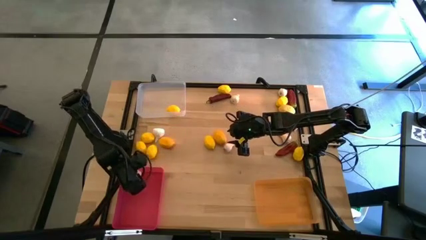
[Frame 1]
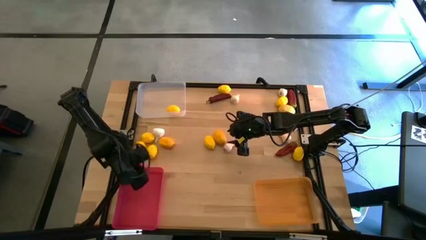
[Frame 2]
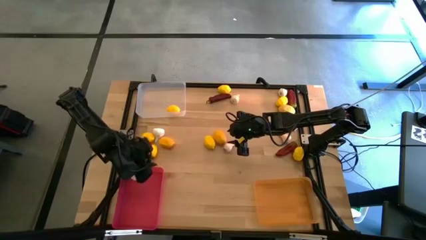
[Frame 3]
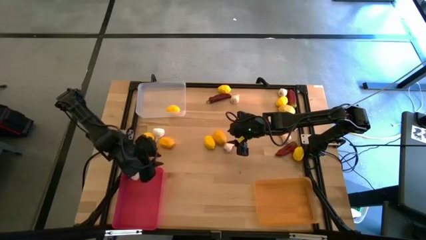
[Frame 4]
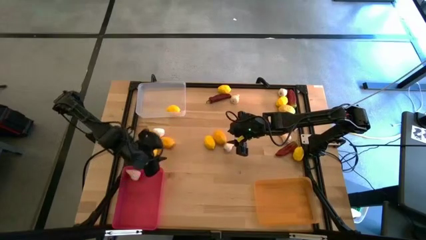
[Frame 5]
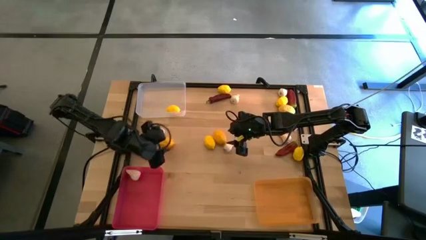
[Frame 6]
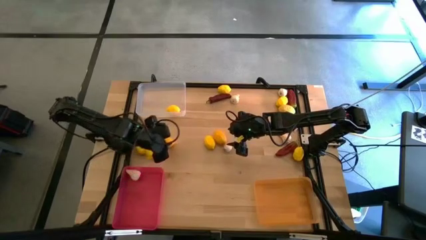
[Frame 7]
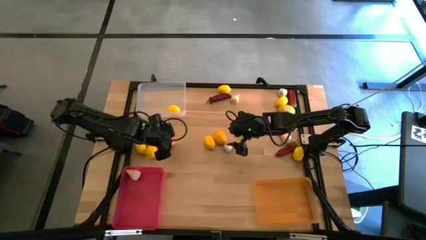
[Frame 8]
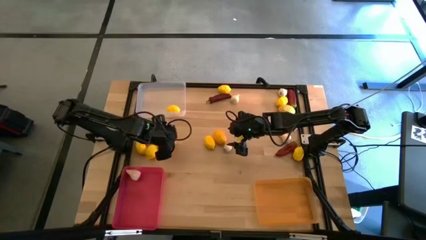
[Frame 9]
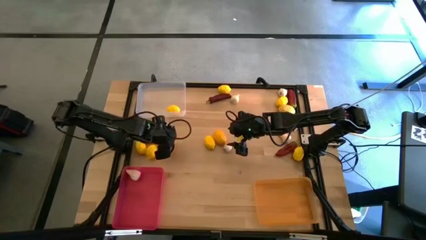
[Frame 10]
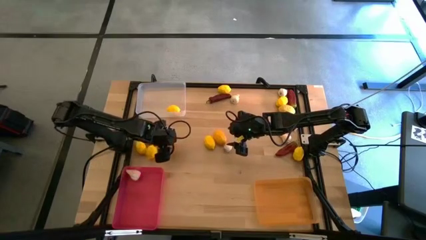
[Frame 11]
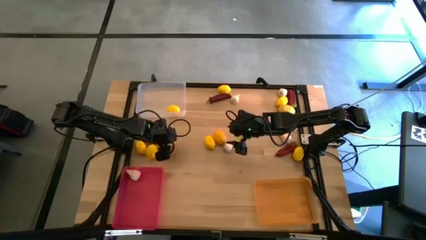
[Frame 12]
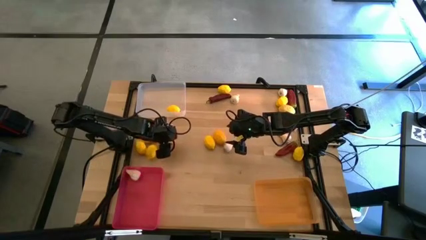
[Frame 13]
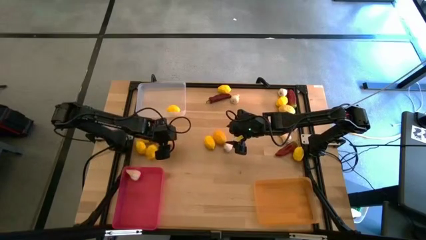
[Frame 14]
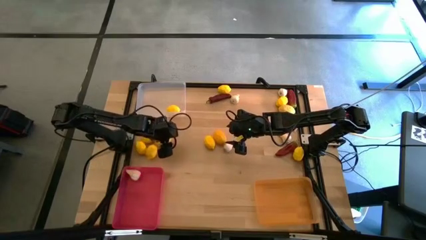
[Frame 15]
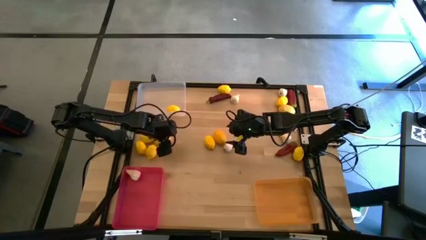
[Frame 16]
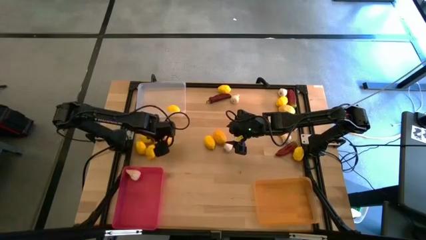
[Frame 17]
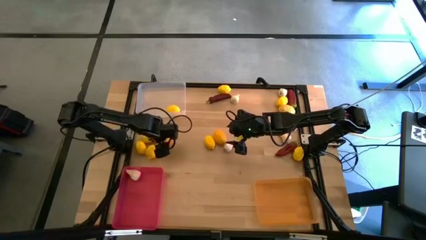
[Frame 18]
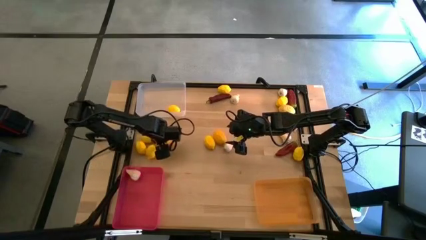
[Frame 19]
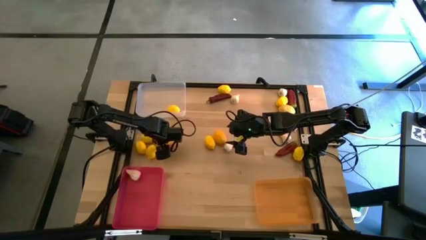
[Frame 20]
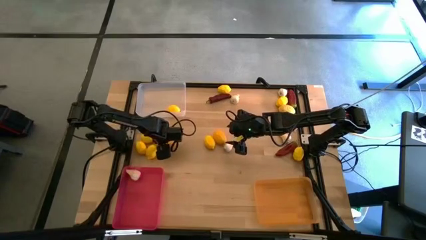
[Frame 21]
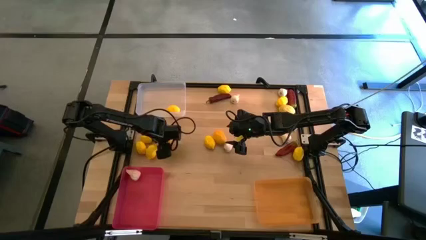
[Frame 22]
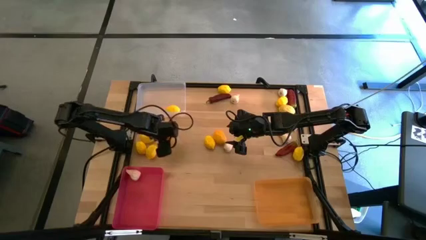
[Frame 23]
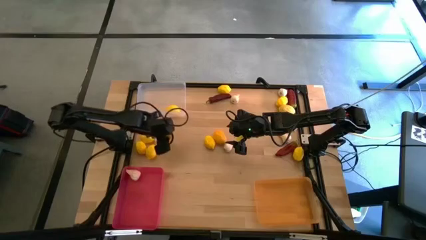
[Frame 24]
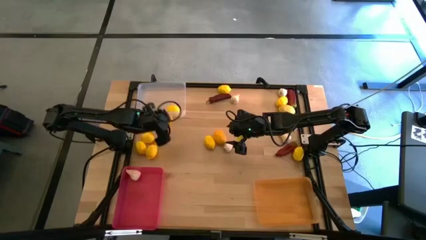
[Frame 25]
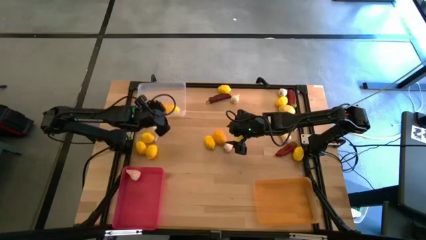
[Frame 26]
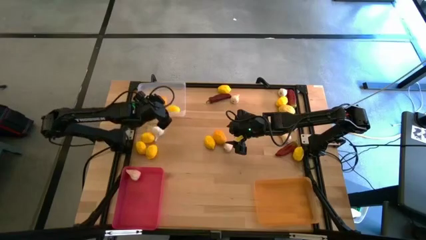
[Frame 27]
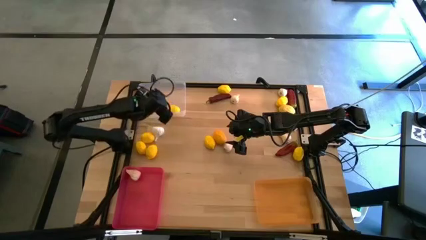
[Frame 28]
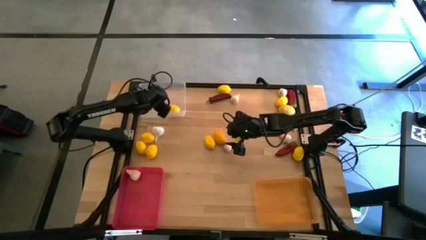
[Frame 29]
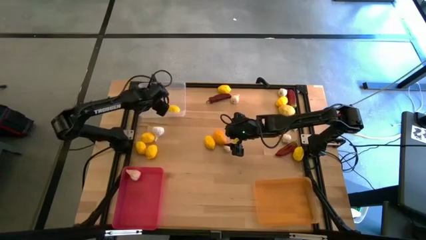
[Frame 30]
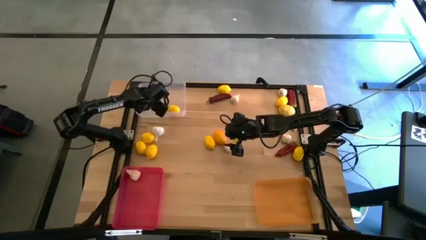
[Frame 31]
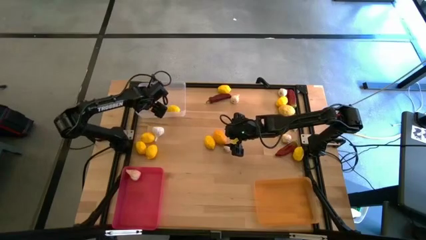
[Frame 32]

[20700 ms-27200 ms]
Task: Sort produce into baskets
Put the yellow lemon into the left white bin

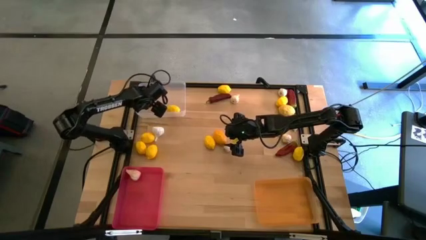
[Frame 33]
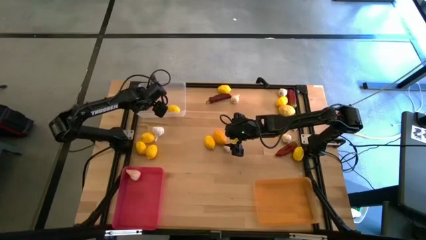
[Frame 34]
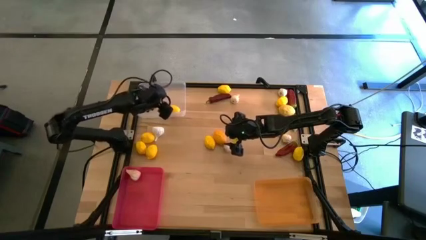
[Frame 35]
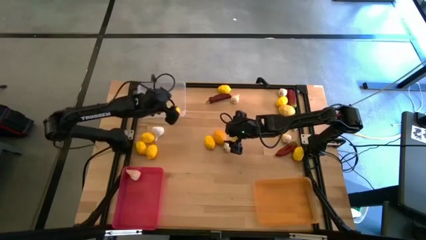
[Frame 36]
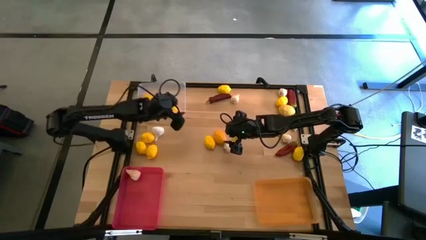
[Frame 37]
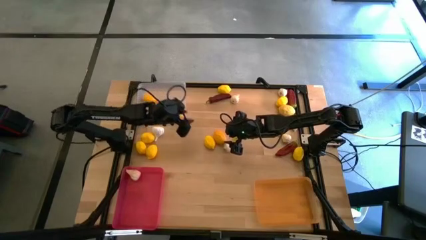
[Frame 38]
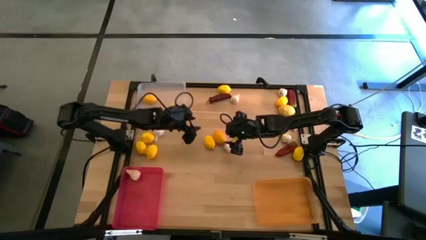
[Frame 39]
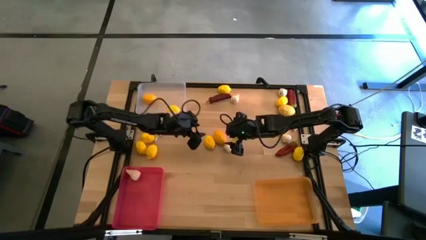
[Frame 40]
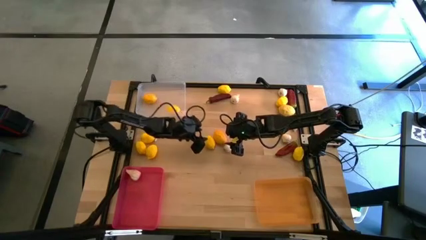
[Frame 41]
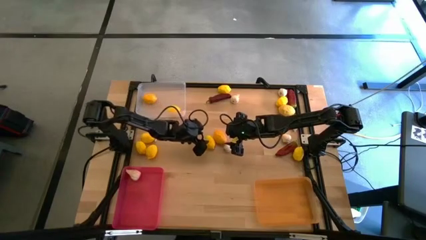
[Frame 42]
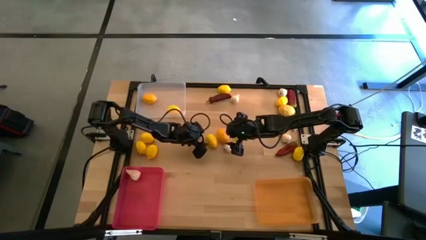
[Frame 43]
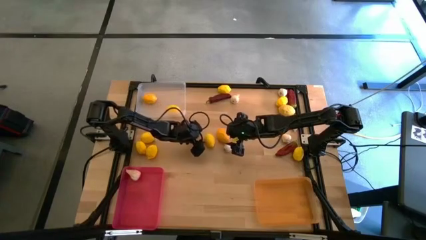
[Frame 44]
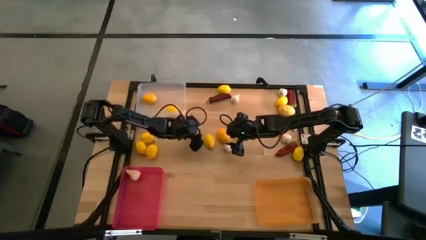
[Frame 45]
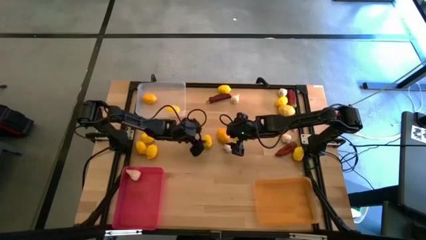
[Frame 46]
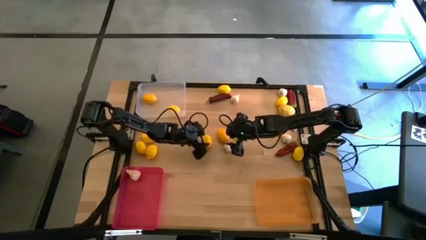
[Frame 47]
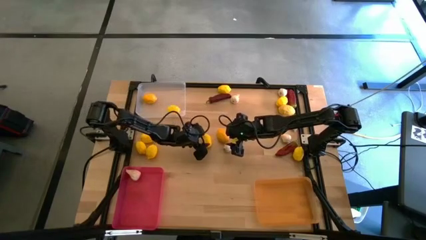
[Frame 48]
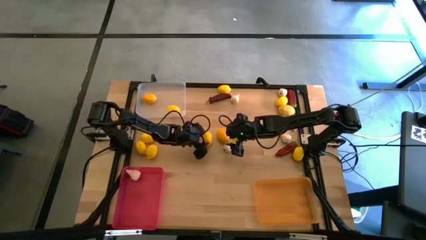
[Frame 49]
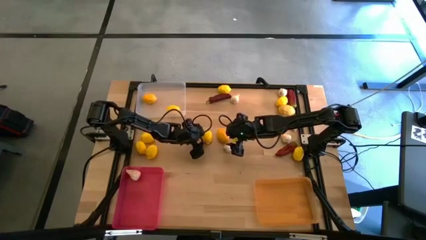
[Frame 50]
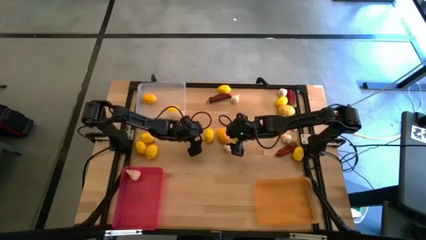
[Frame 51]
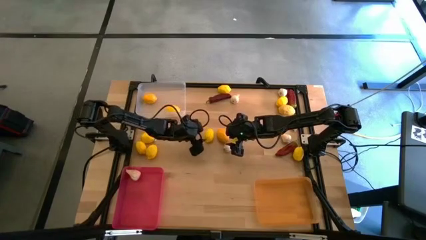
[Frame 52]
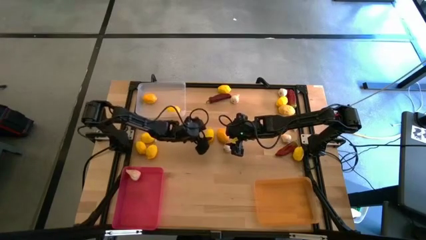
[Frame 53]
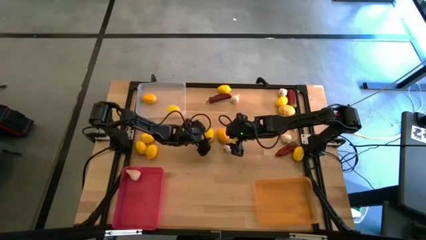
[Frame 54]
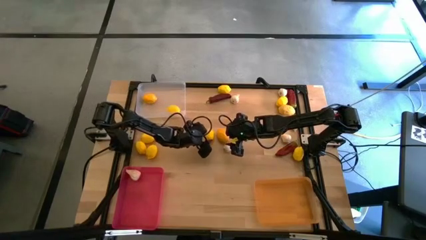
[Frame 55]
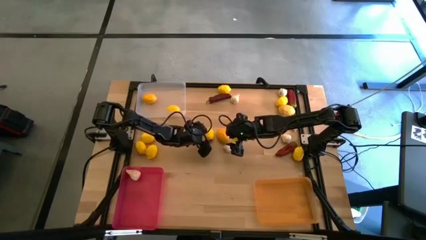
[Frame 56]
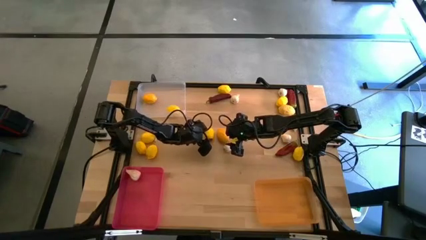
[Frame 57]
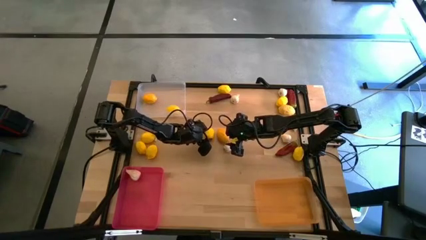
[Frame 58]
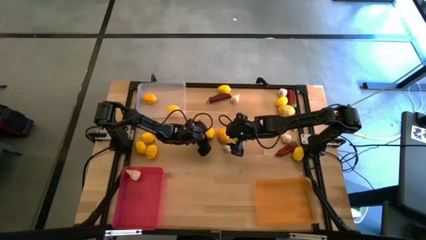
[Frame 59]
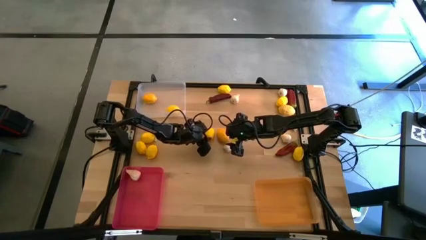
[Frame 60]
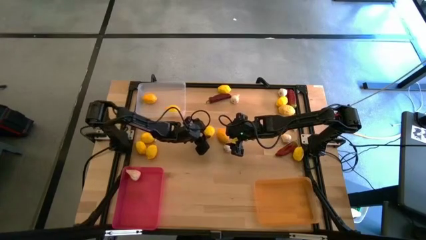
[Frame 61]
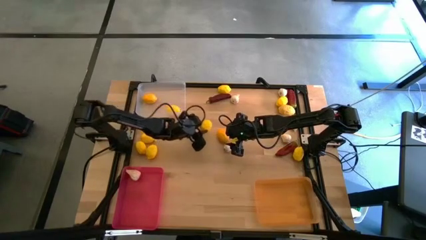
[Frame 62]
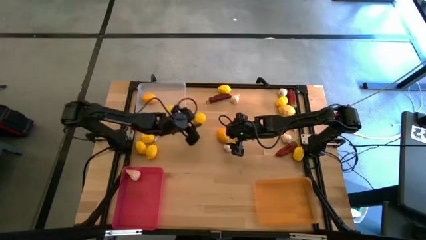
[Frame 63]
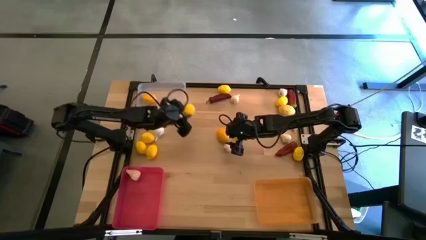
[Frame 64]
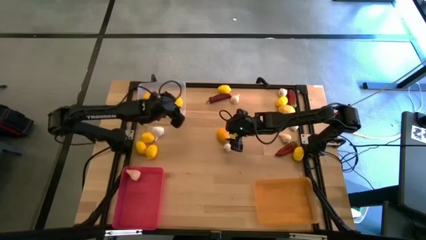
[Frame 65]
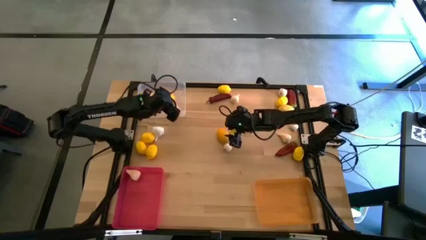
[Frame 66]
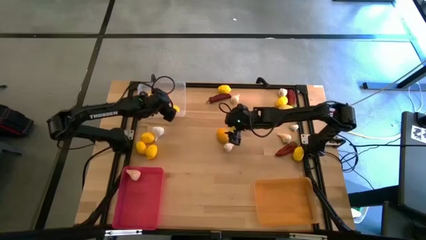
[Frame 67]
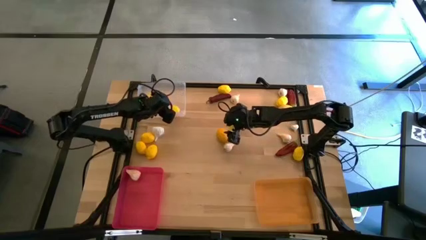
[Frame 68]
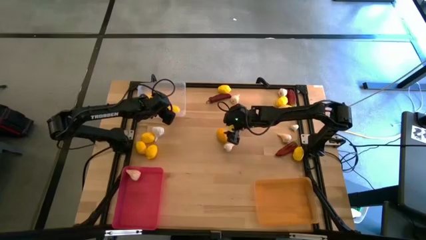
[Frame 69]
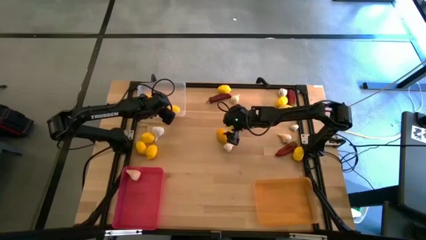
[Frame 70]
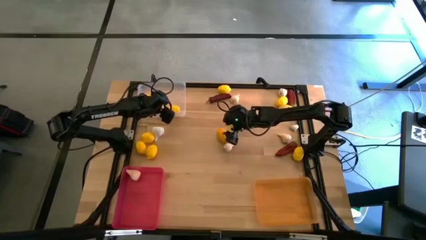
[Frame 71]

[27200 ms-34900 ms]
Put the yellow lemon into the left white bin

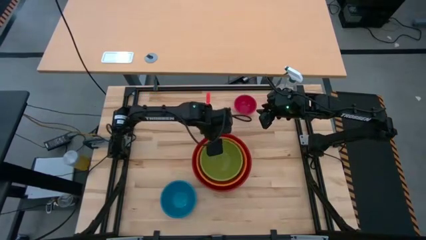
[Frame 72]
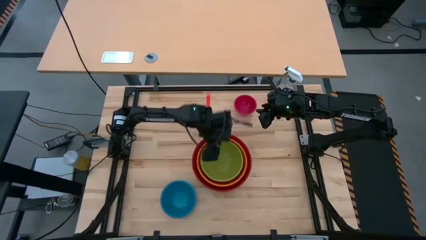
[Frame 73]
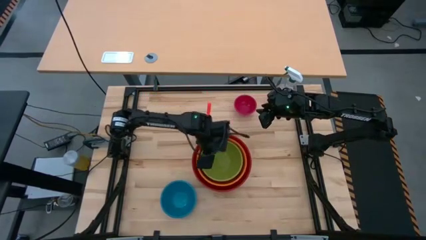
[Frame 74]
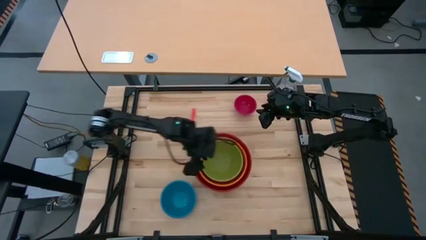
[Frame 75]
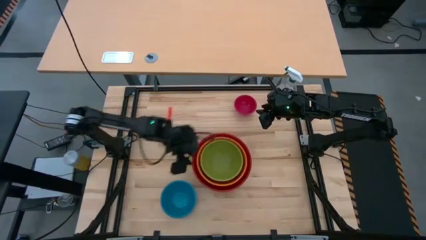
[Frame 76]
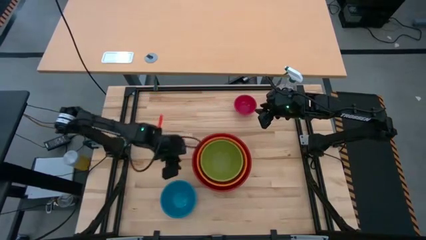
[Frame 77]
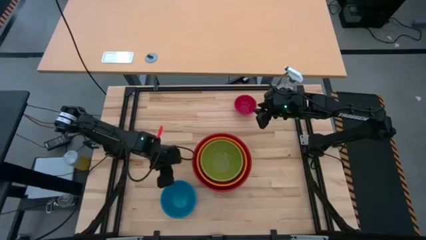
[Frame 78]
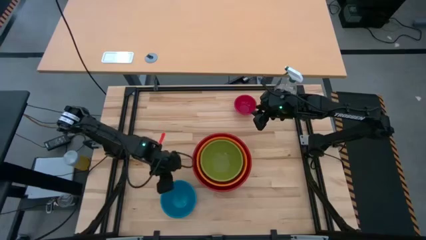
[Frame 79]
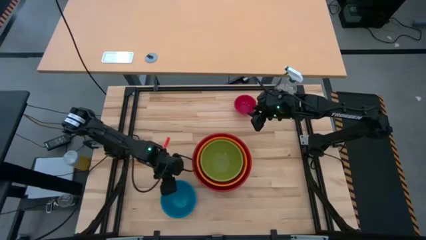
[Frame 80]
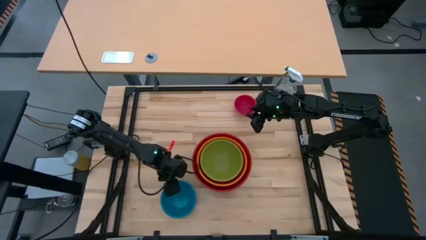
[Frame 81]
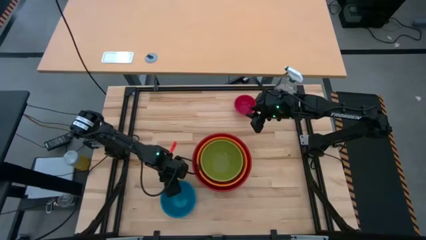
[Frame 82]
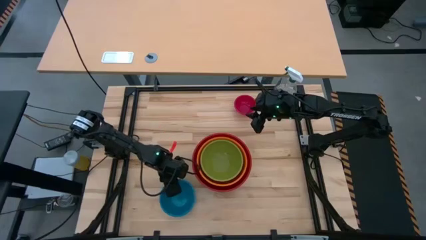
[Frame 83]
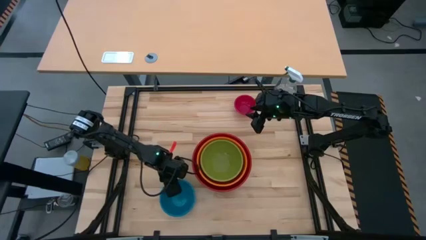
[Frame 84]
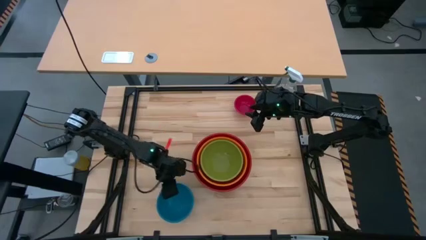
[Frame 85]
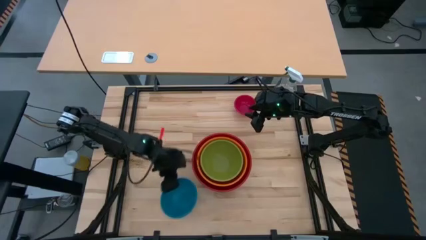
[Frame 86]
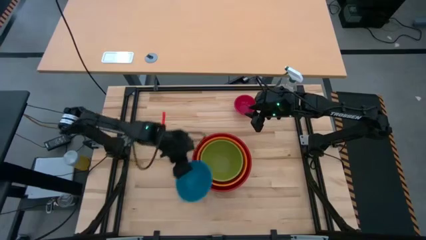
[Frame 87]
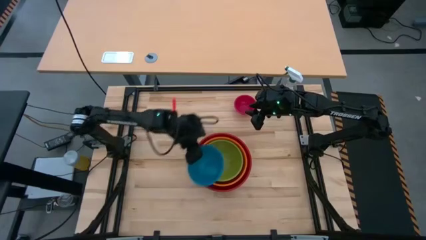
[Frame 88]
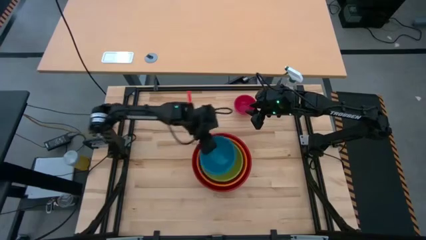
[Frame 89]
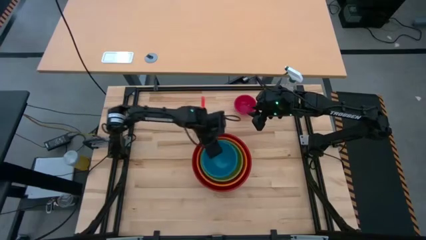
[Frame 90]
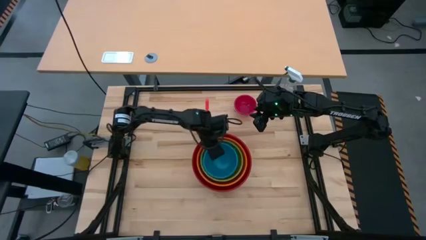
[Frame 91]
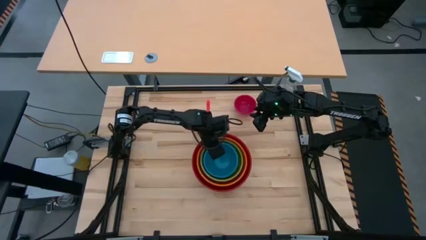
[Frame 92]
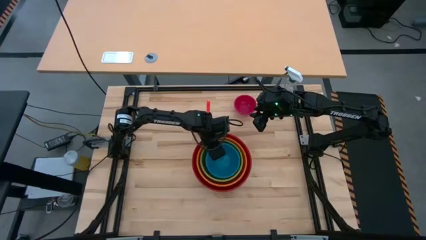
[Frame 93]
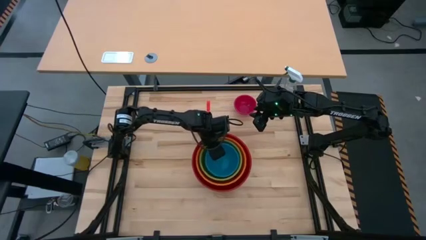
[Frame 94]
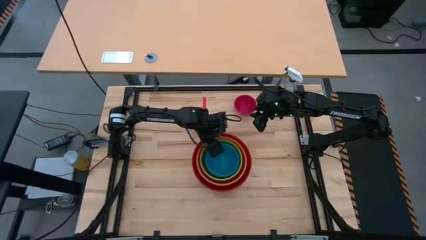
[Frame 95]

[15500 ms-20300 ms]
Task: Nest bowls inside each other by size order
Stack the blue bowl on top of the green bowl
